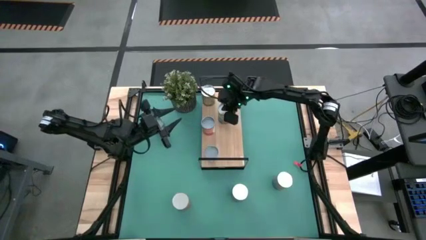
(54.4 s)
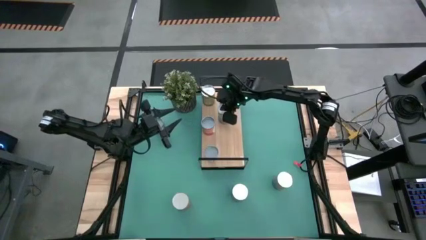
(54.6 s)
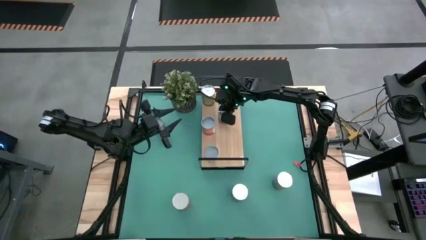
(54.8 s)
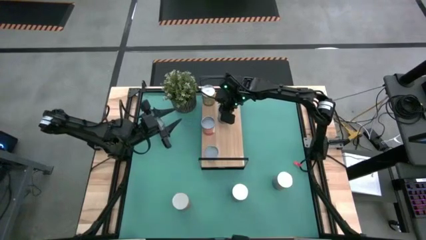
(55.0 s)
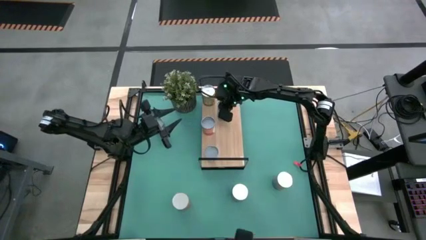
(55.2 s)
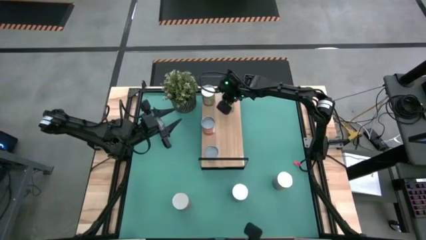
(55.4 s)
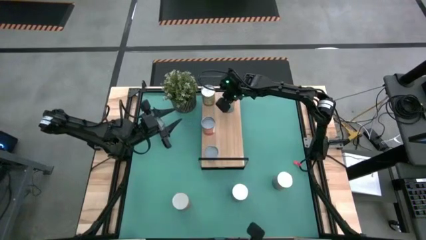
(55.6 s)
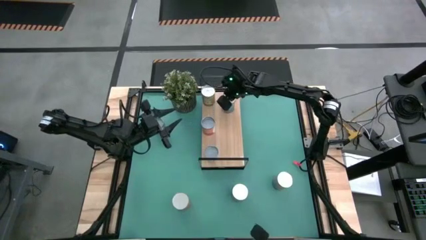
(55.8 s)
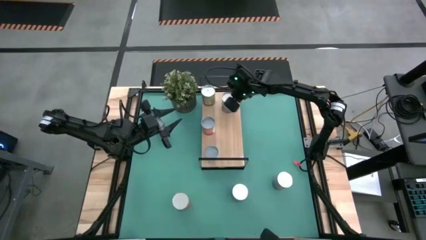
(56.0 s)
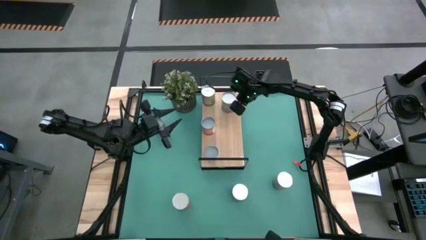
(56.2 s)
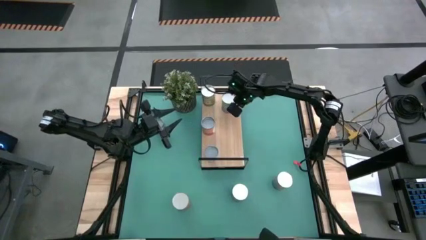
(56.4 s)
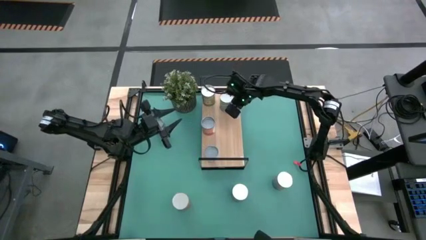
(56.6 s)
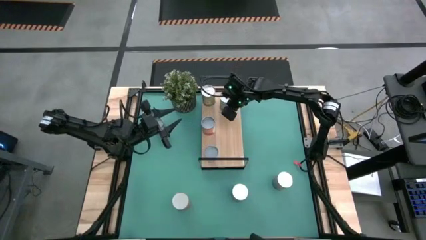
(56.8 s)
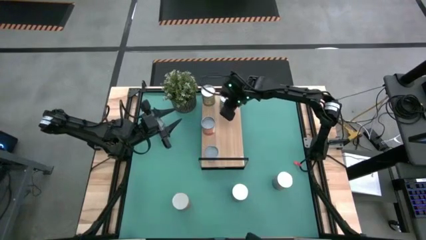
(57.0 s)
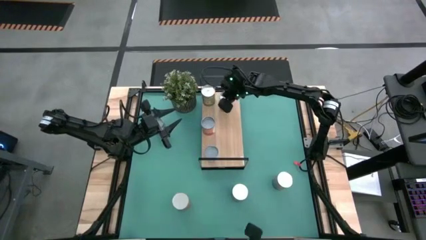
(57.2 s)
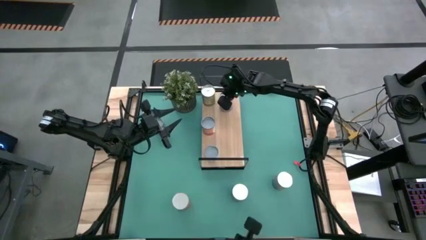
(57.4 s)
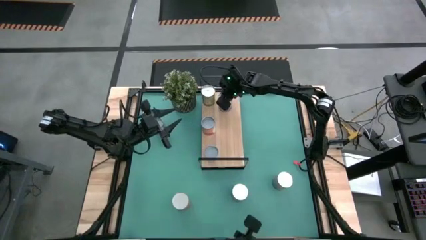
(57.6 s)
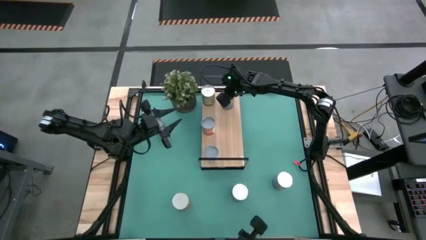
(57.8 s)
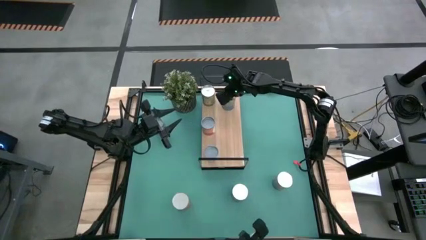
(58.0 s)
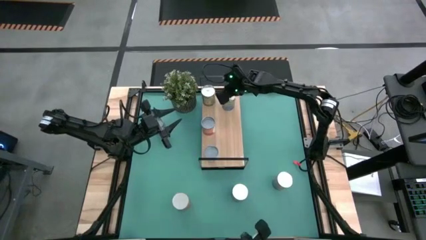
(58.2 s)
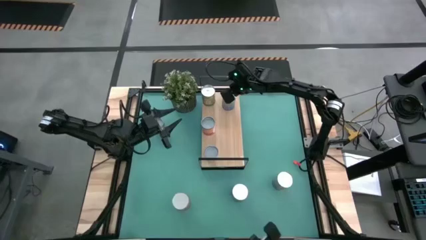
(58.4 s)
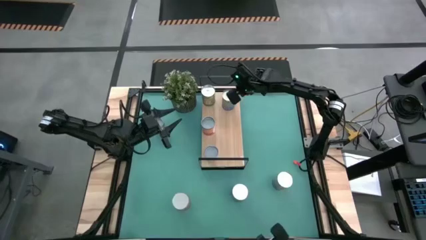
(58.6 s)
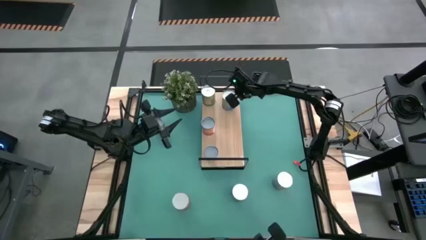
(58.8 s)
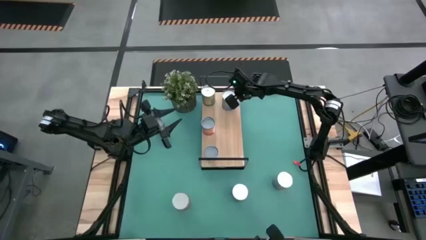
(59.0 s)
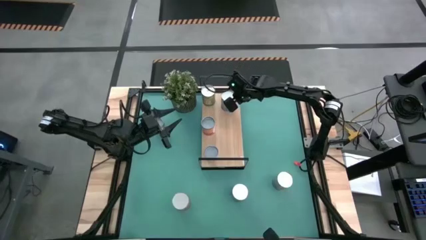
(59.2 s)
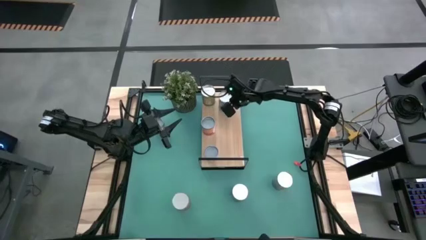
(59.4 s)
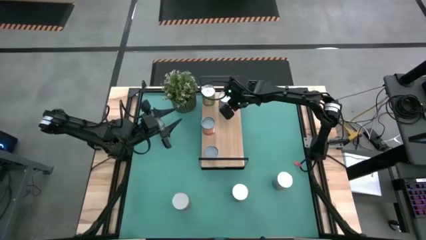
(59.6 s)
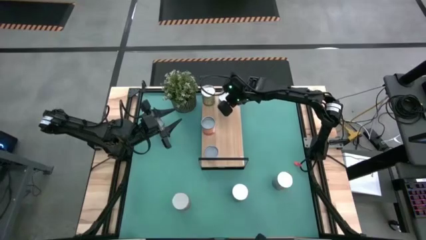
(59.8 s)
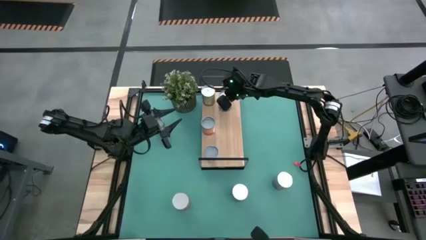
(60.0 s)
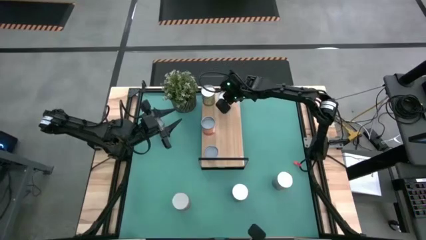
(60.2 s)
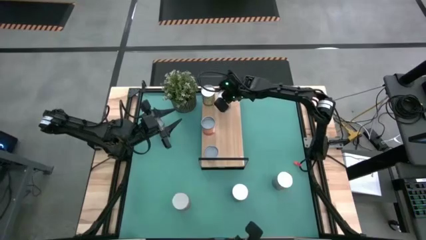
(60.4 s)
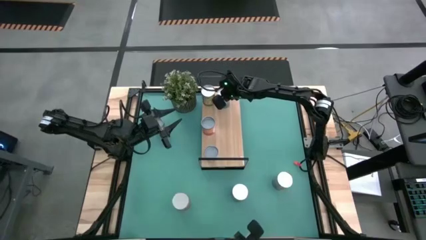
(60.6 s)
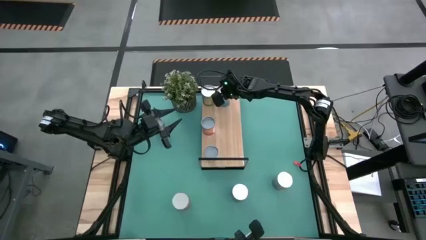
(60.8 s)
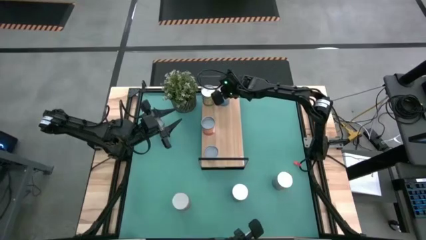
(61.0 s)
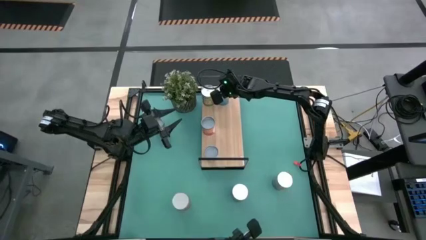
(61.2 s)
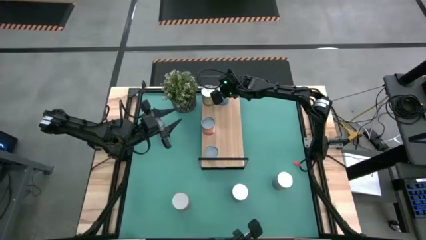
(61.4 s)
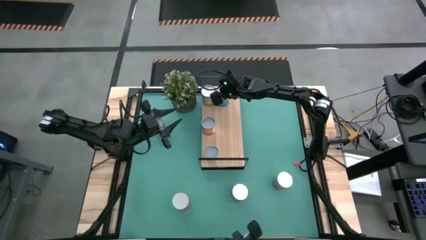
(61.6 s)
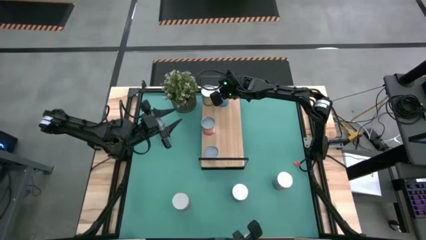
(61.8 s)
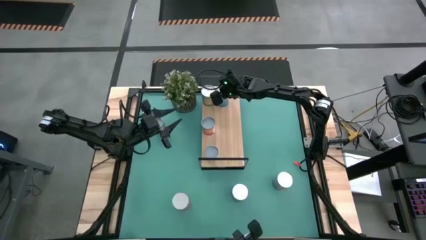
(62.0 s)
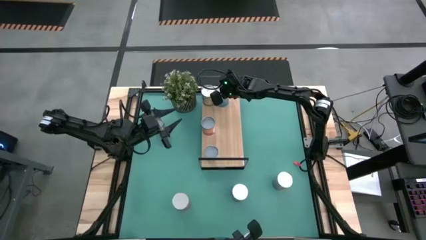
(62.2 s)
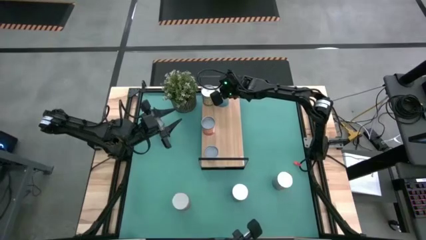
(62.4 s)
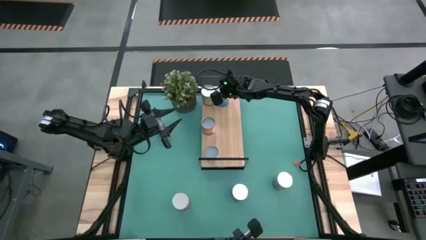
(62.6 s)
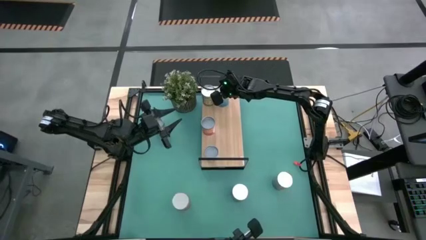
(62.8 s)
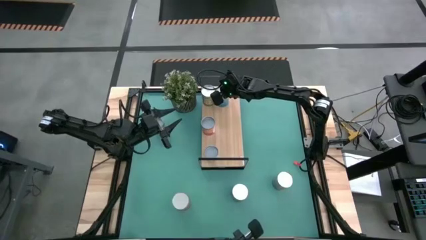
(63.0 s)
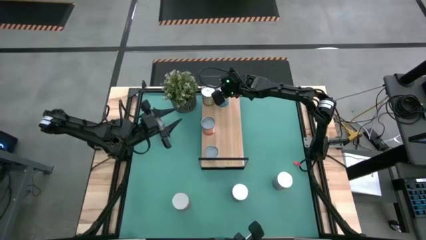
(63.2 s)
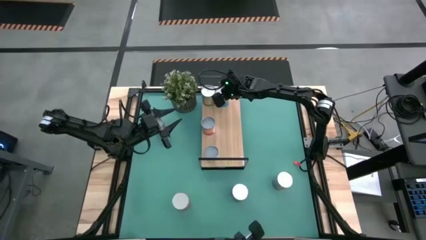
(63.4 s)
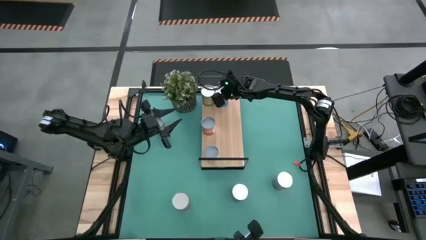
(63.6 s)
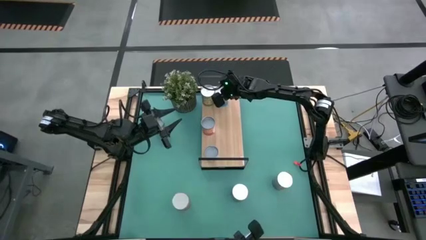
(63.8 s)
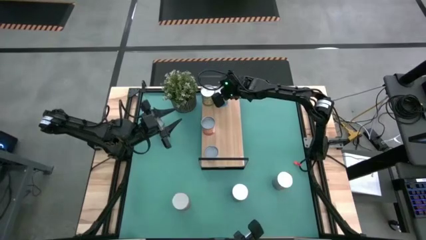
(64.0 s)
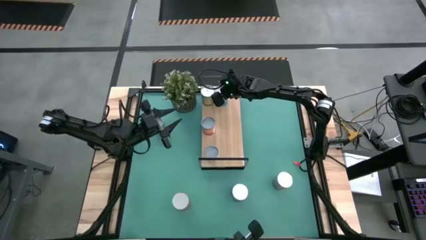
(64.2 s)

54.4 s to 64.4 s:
Task: Pick and place cans onto a shelf
Put the canned cherries on the shelf

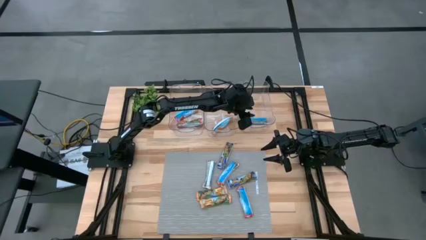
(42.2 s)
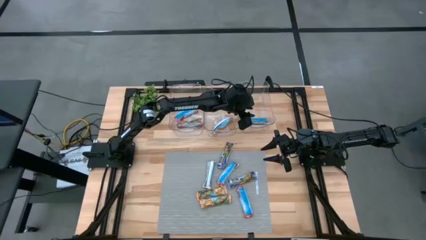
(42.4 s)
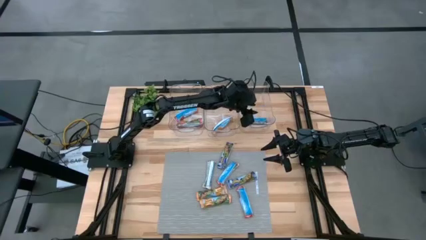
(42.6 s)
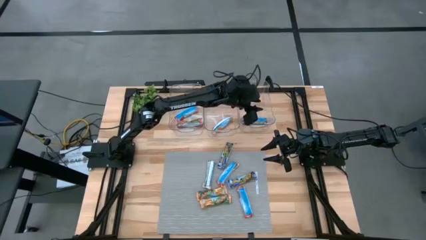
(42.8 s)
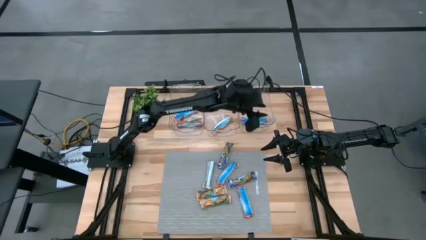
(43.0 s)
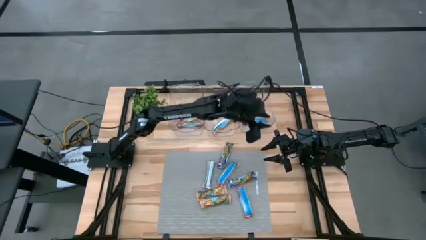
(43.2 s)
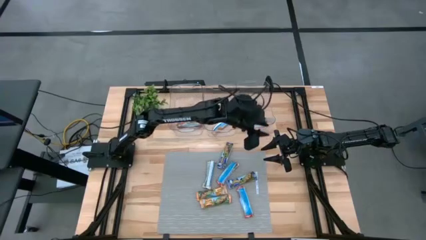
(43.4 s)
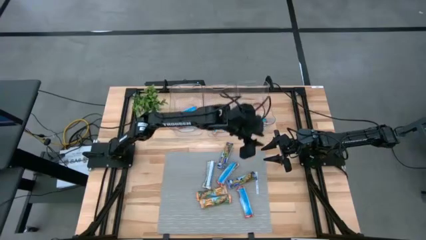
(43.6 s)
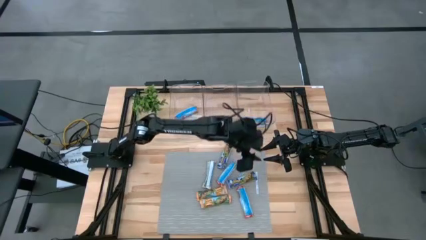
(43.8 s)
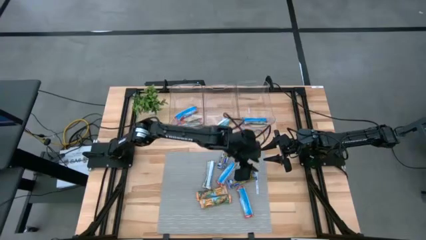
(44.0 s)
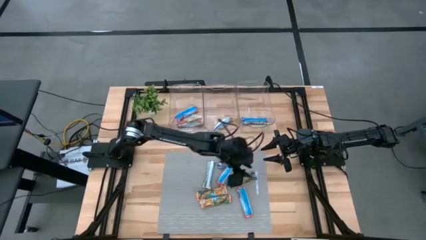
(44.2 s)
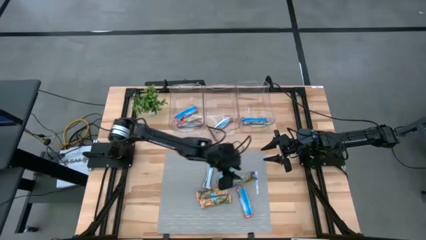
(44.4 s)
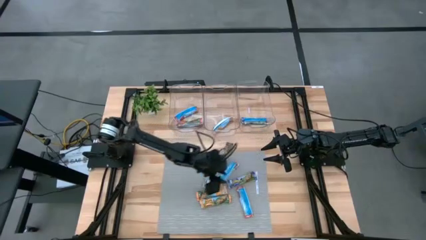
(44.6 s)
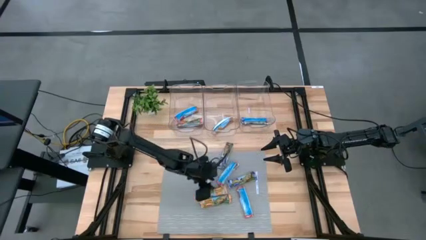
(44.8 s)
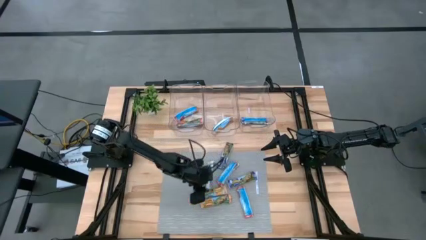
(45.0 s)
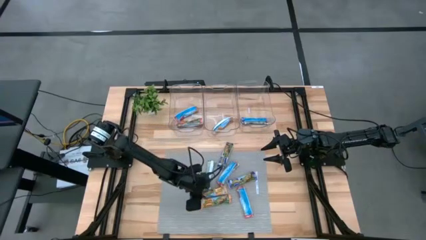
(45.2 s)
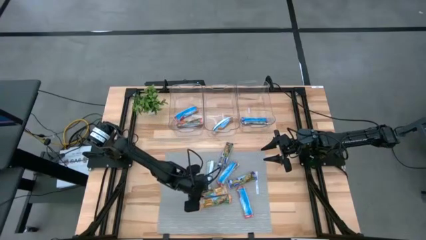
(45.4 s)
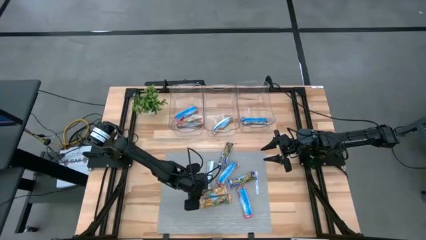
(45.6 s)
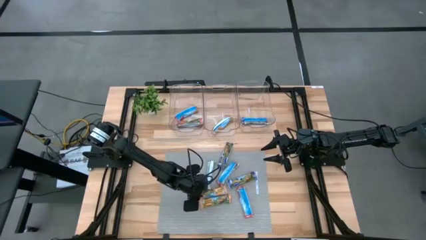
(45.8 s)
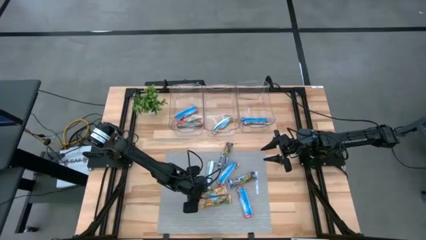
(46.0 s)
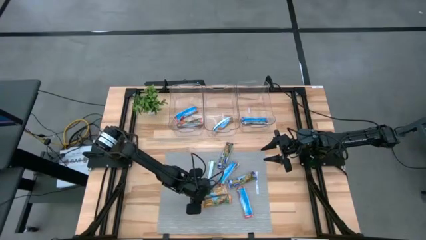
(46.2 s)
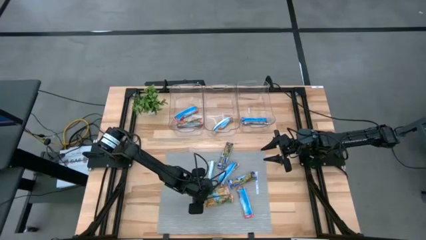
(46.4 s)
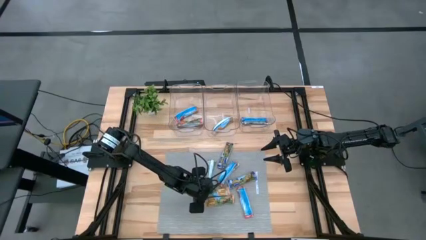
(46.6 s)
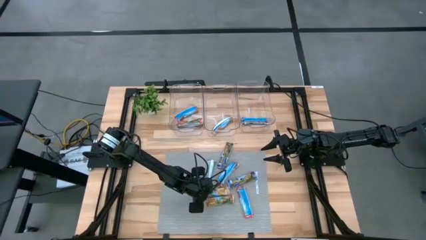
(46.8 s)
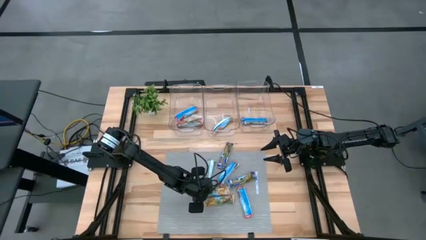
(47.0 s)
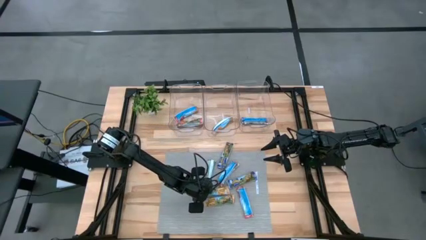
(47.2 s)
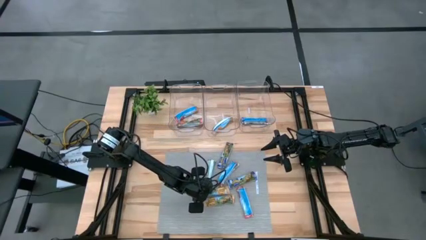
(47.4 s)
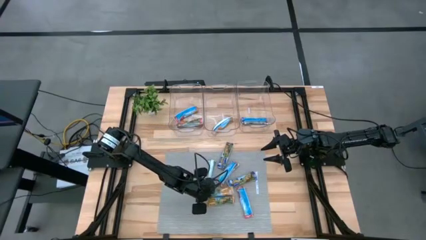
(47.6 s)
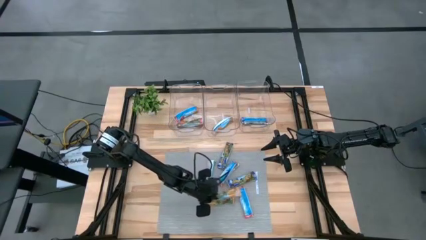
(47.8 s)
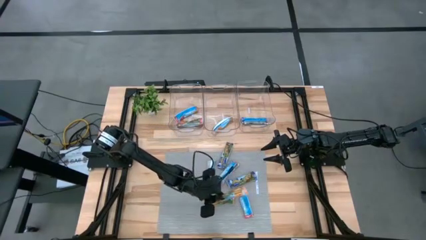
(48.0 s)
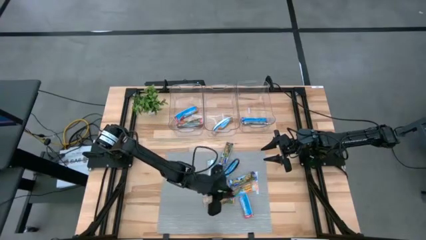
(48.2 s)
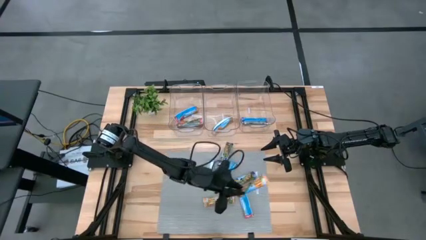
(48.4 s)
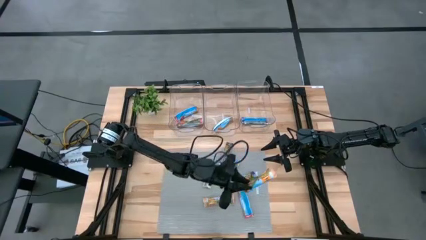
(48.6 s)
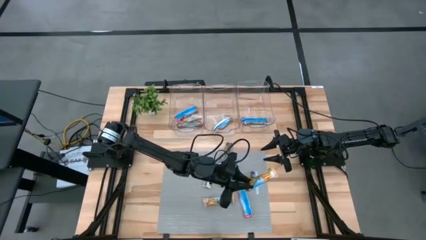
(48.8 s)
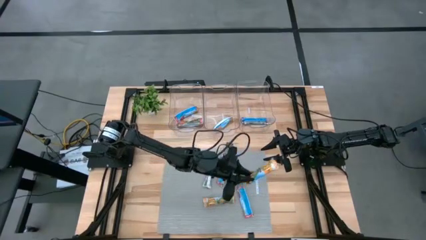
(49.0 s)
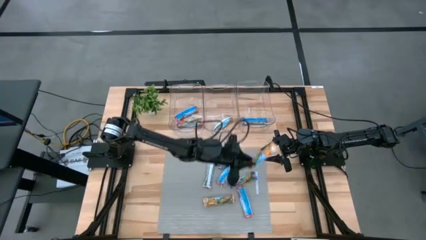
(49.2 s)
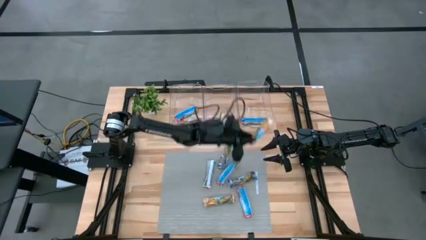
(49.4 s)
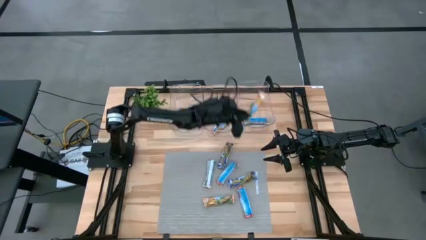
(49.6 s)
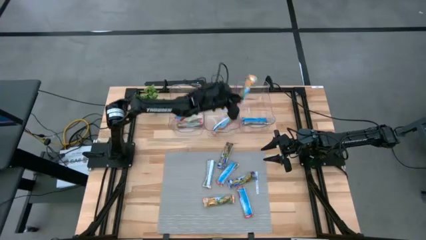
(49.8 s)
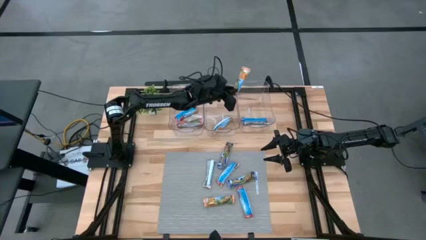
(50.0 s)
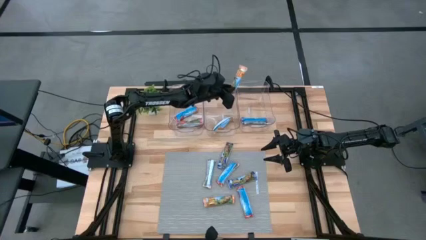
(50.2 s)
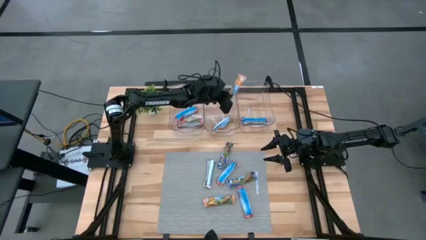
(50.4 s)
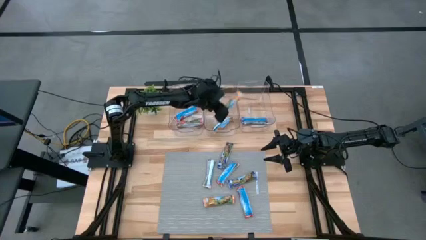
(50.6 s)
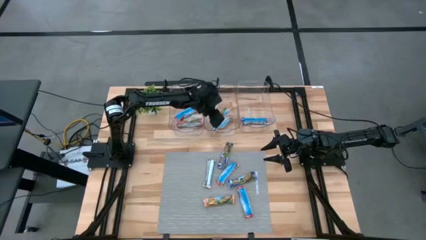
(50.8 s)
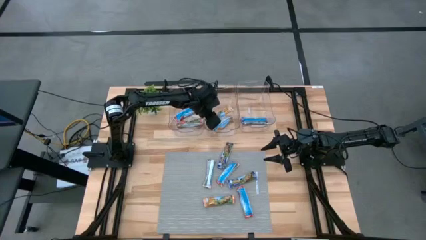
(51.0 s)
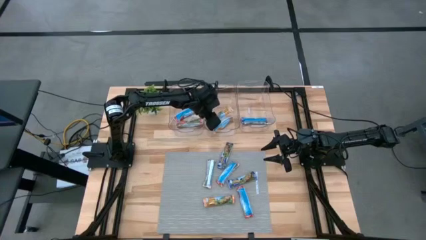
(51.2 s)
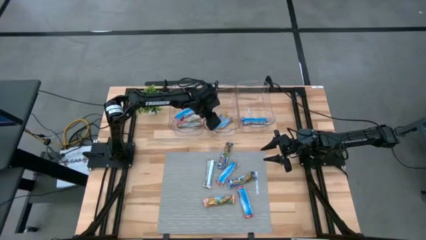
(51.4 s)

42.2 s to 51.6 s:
Task: Pick and place Granola Bars by type
Put the yellow granola bar into the middle transparent bin
